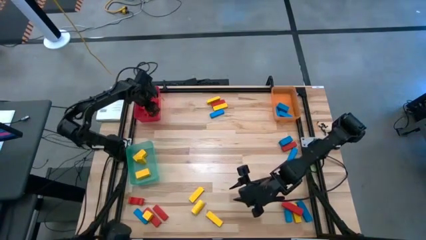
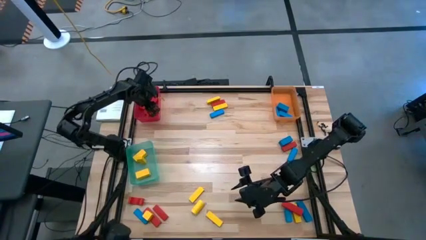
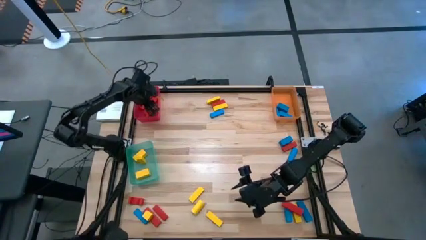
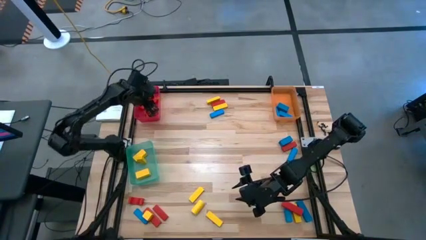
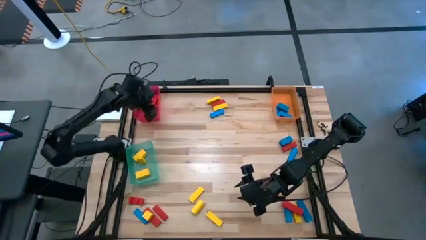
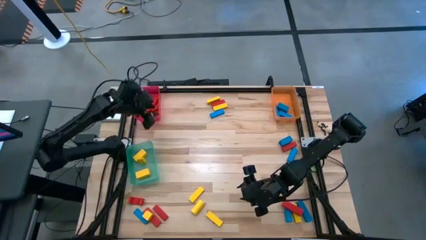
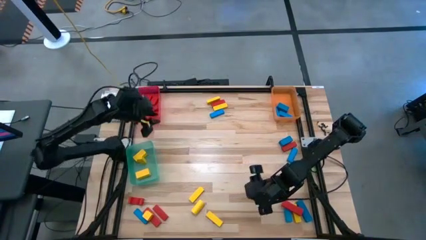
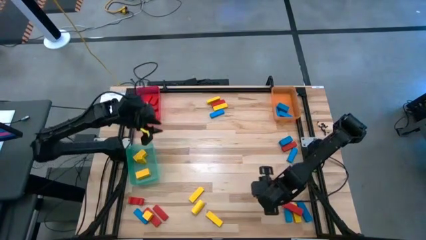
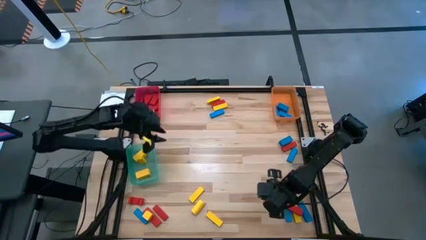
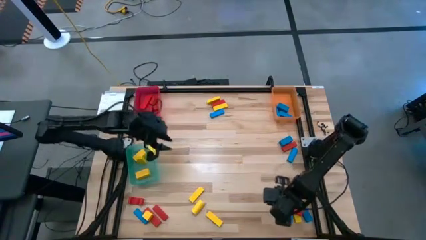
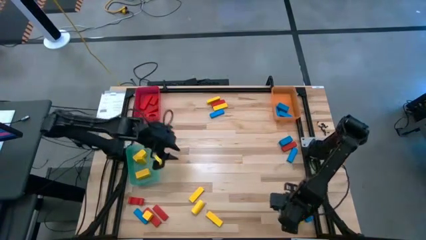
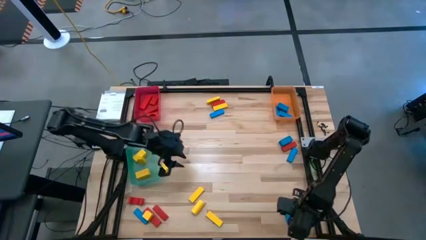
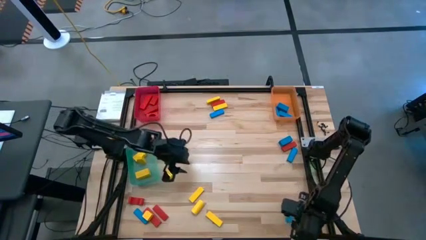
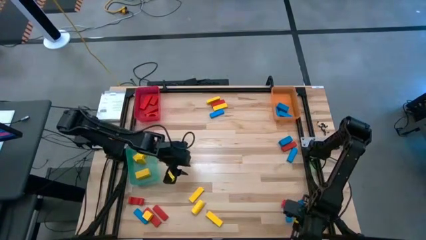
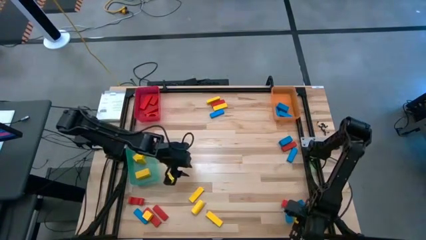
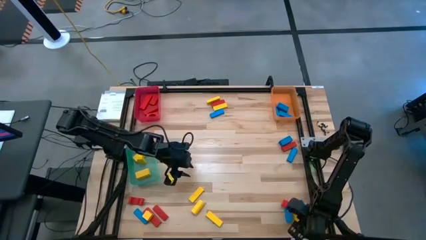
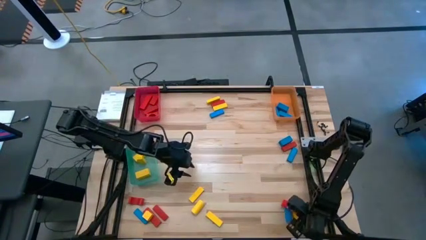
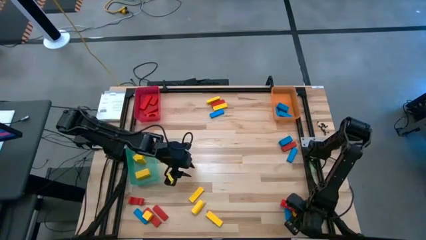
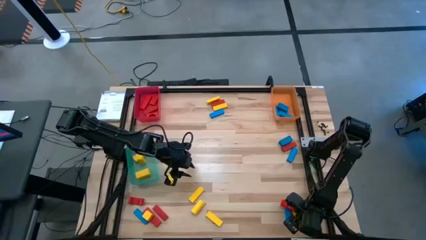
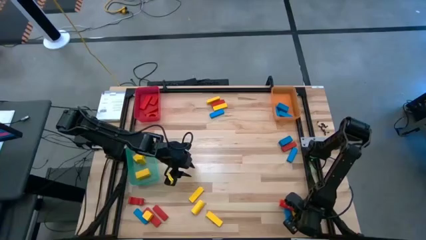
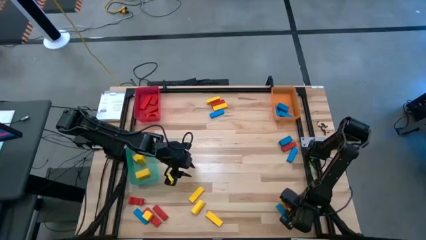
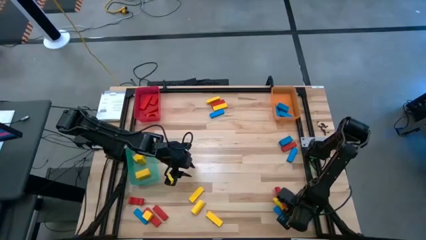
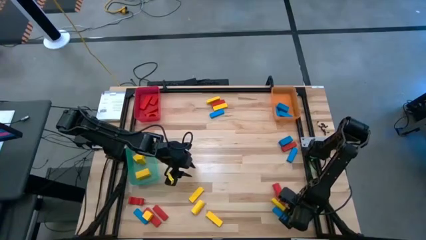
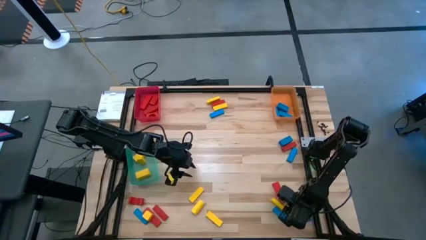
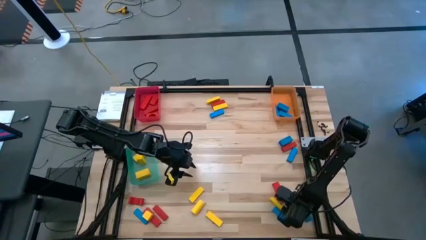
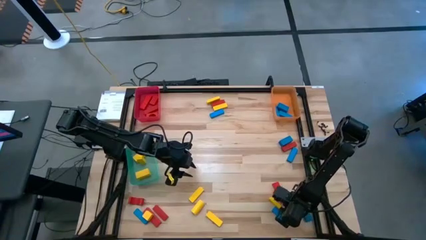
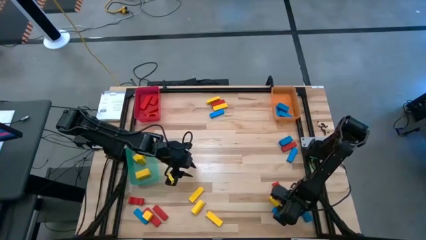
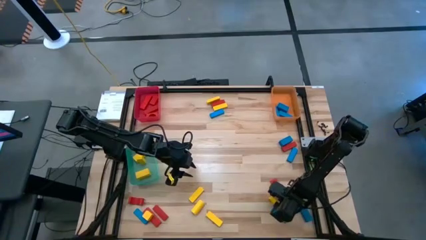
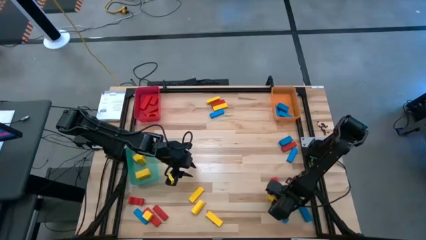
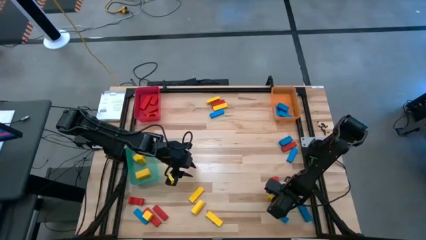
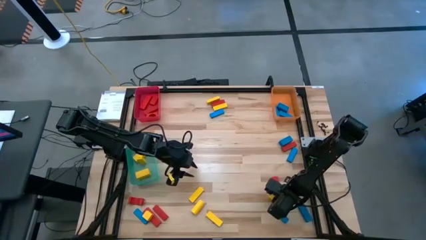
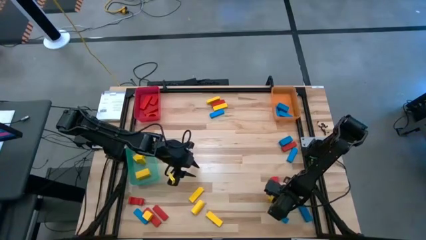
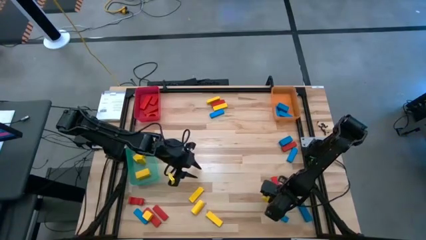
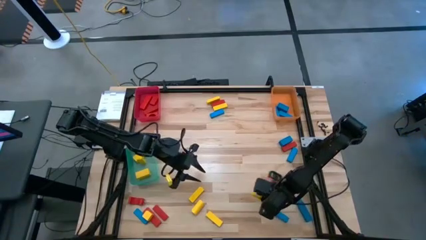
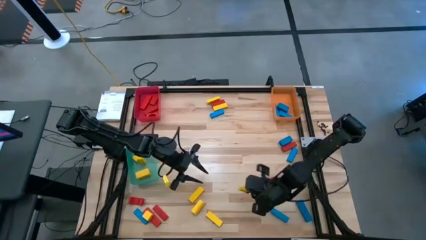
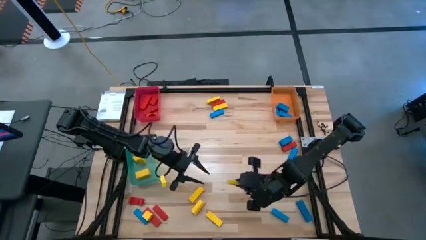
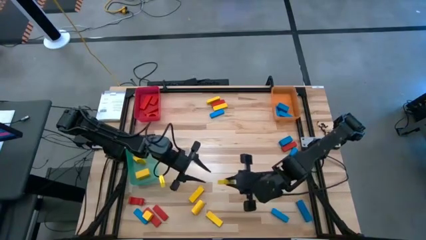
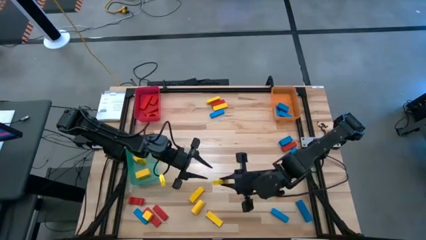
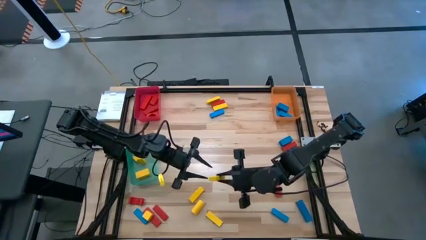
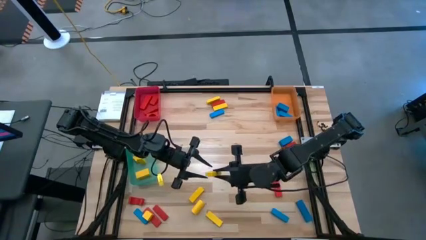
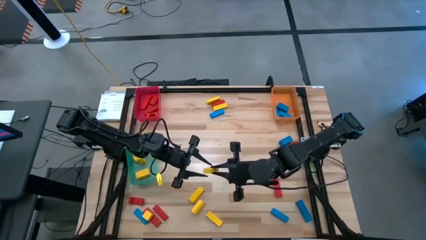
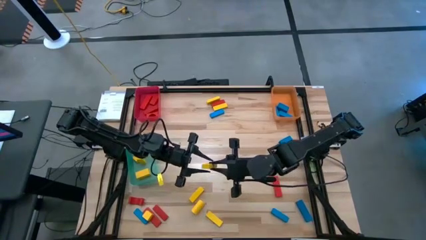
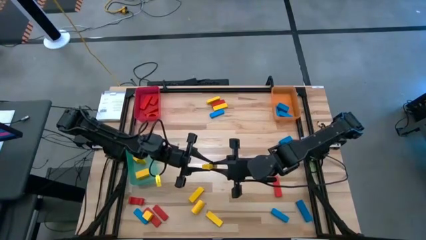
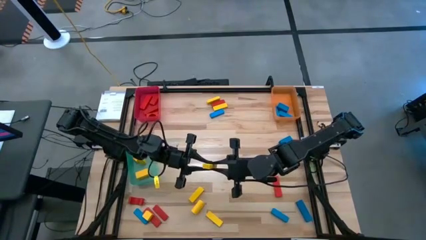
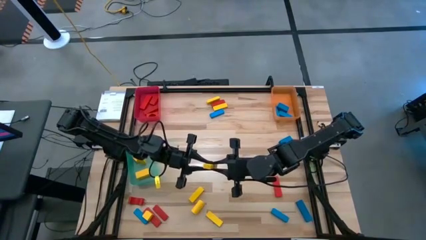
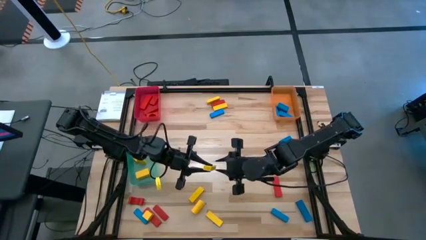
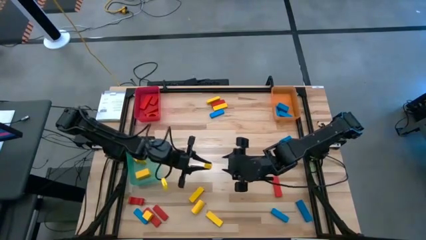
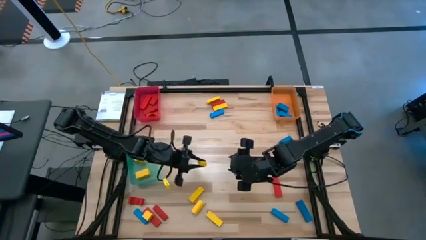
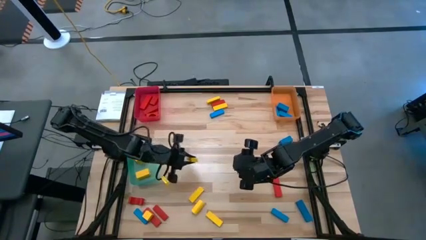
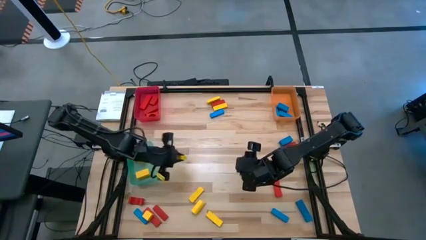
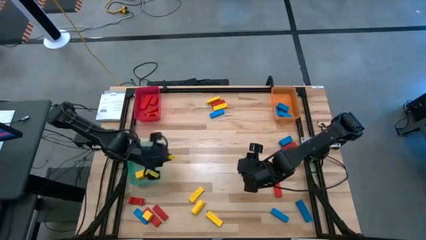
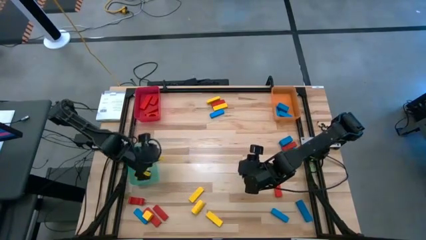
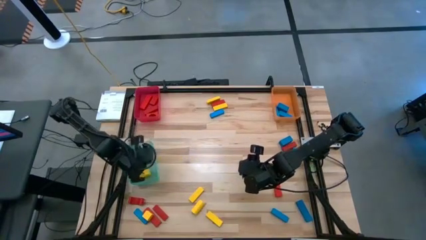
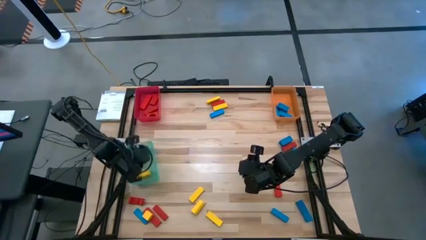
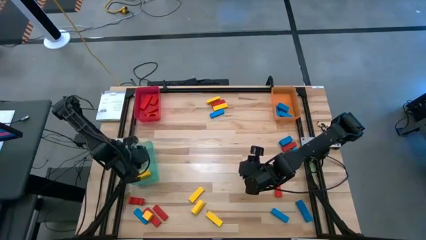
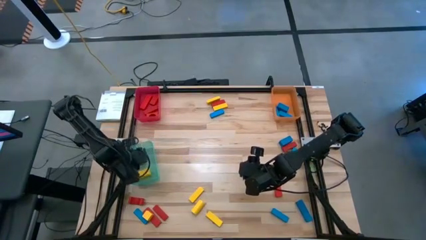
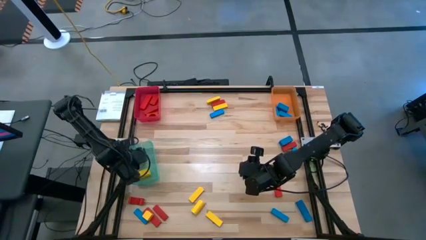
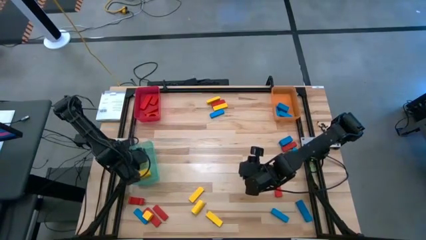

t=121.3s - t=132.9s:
Task: Sort blocks
Put the yellow block into the green bin

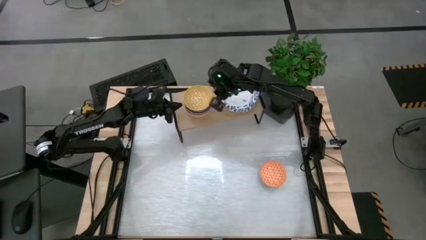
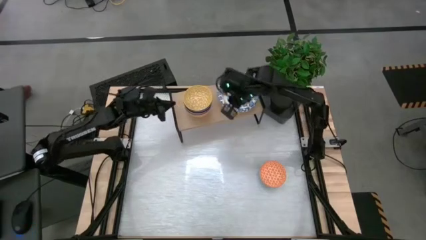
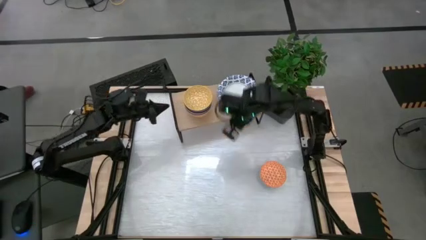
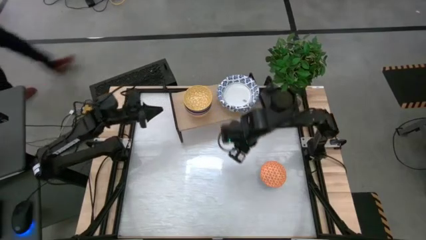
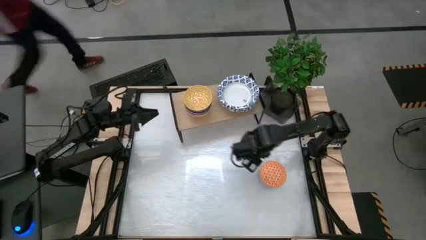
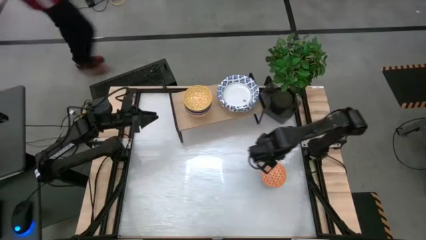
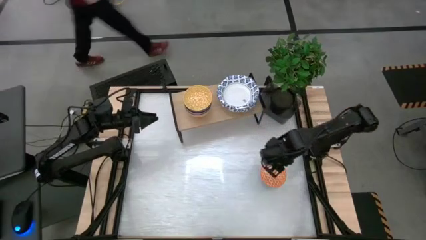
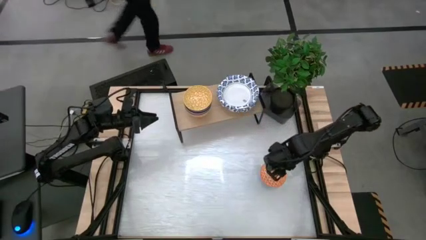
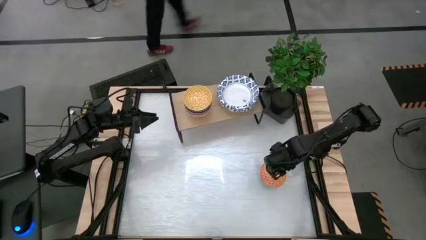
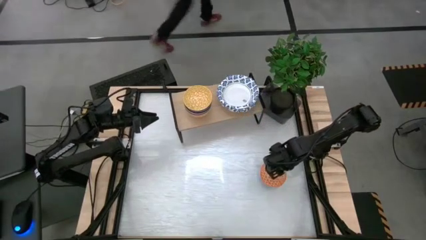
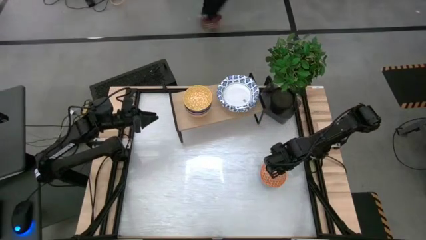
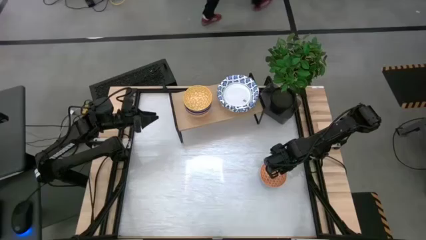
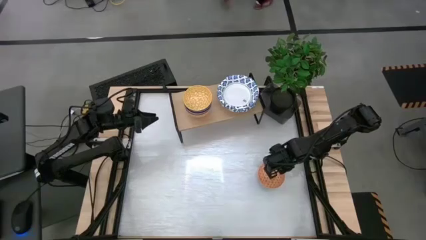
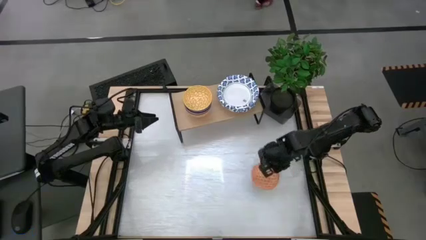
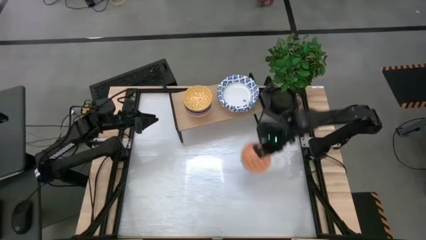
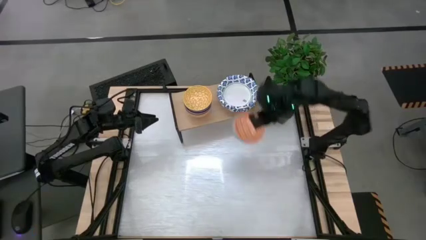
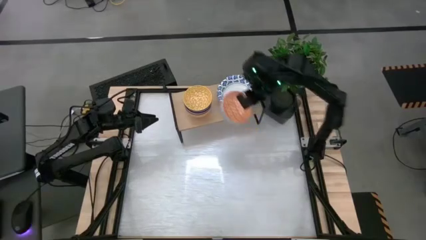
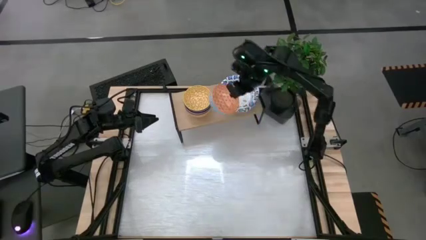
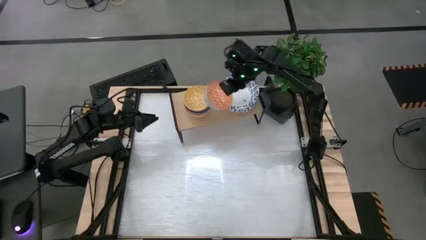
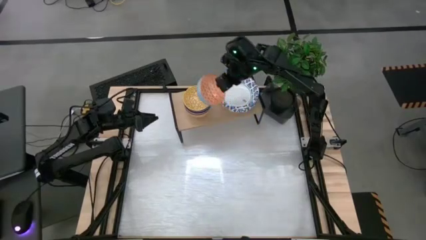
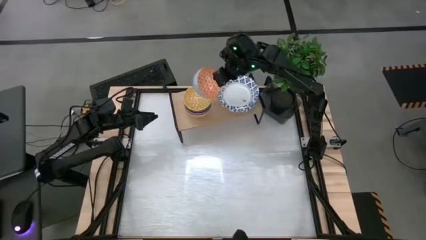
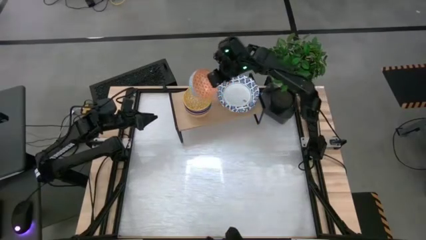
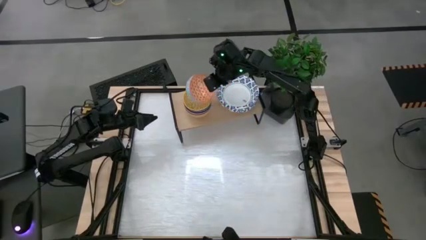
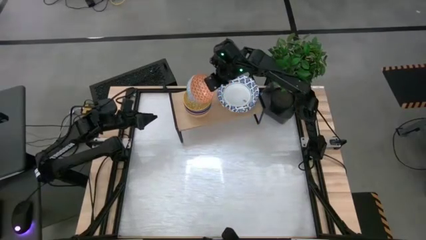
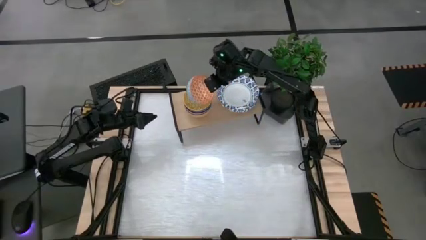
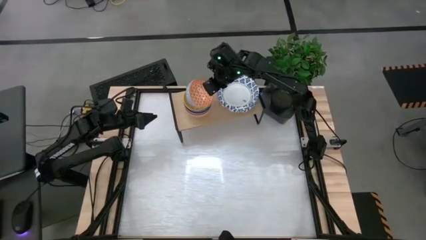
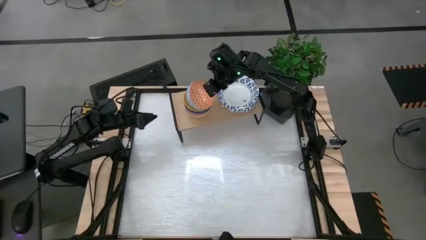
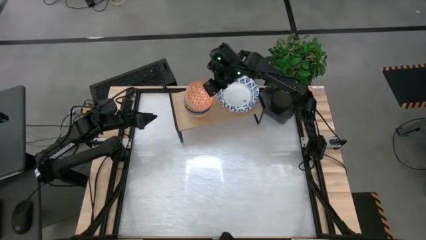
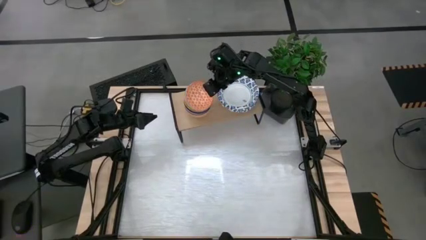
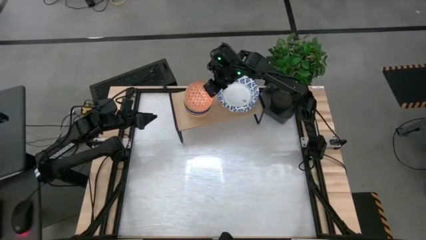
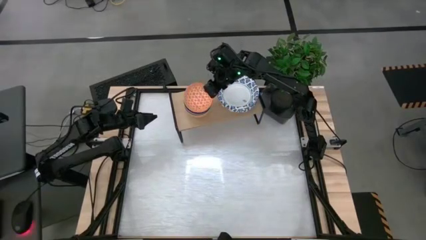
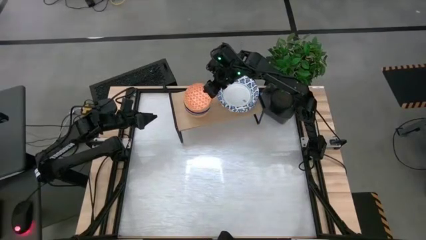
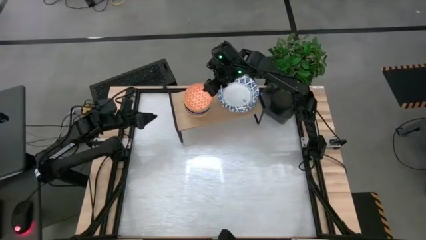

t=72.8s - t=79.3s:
Task: Place and stack bowls onto a shelf
Stack the orange bowl on top of the yellow bowl on the shelf
